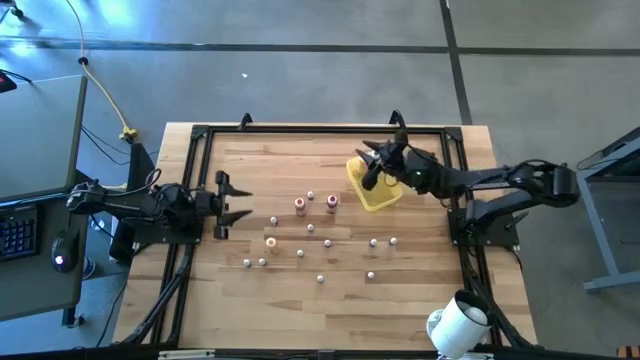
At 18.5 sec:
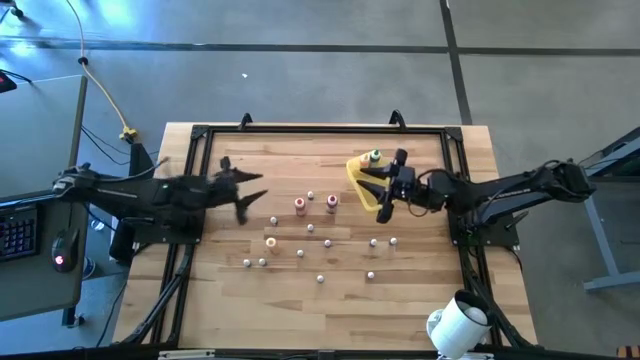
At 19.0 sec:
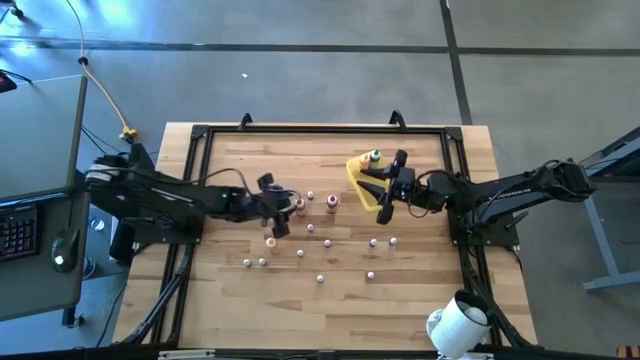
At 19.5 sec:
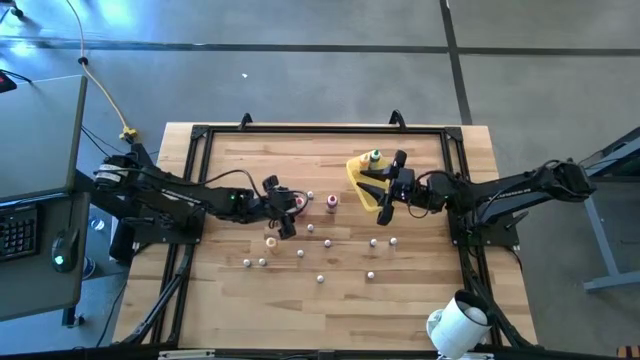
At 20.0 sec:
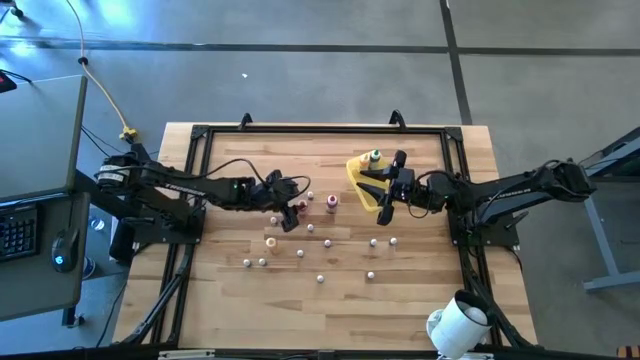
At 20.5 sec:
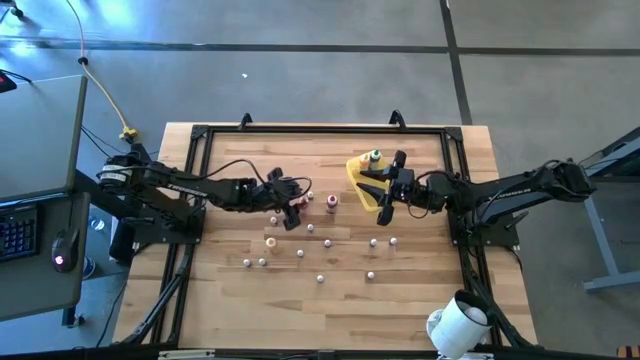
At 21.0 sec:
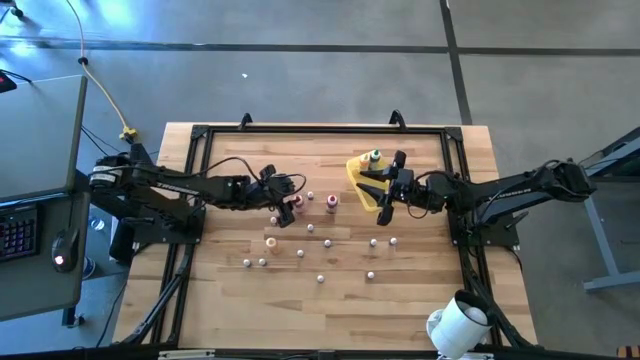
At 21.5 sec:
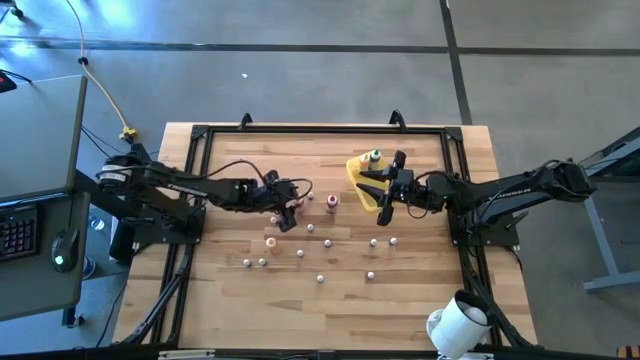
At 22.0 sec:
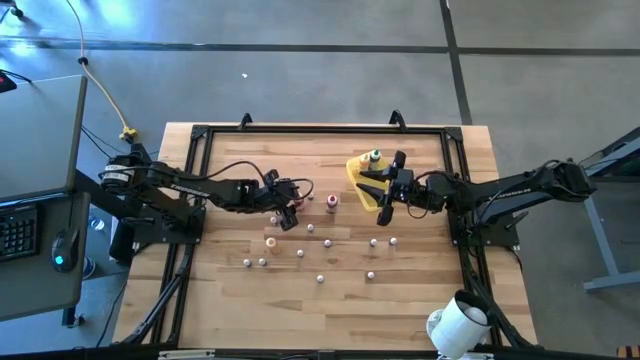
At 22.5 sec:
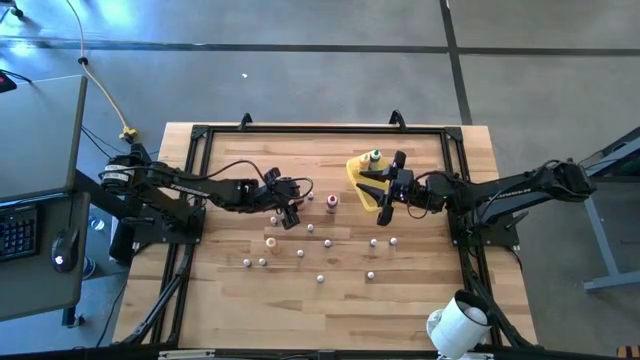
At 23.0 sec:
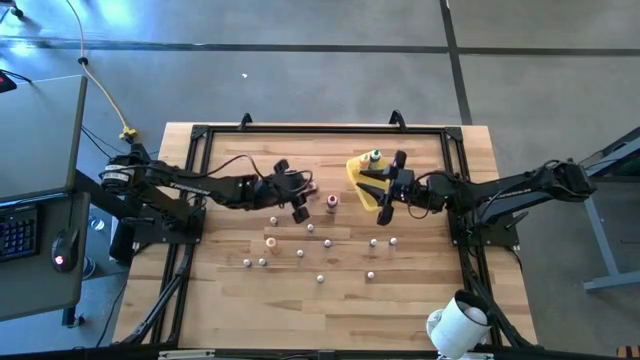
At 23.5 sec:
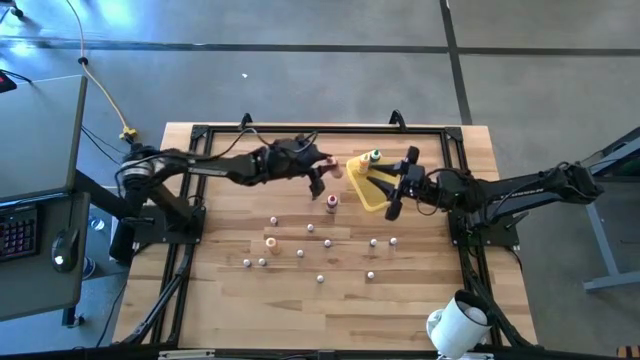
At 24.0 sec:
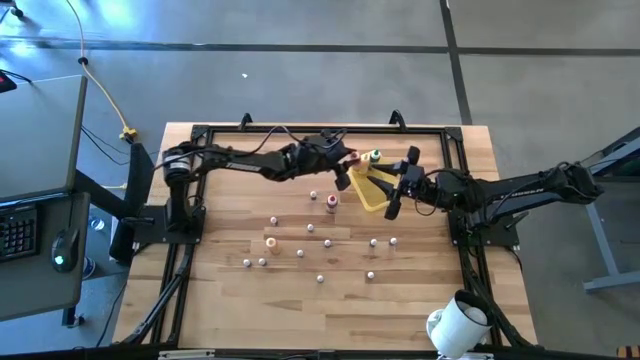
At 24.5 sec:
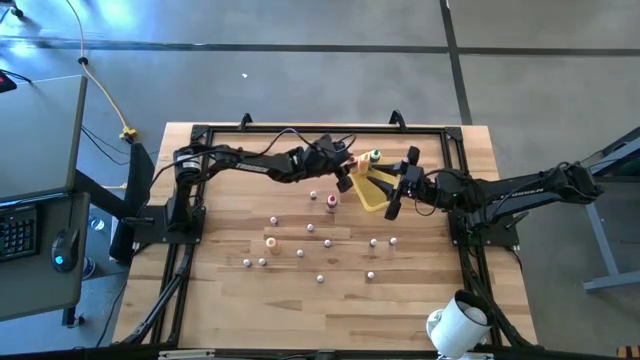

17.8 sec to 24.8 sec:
Task: Pick & Place food coloring
Put the large orange food coloring bottle into the bin

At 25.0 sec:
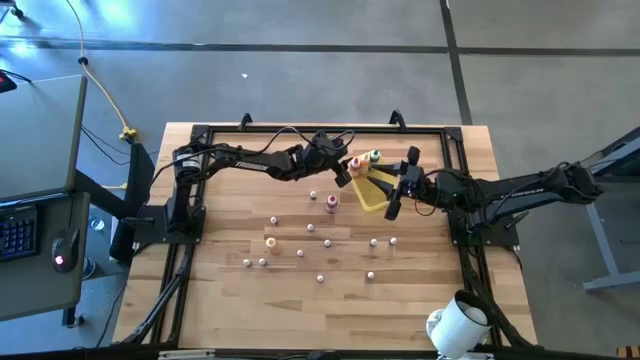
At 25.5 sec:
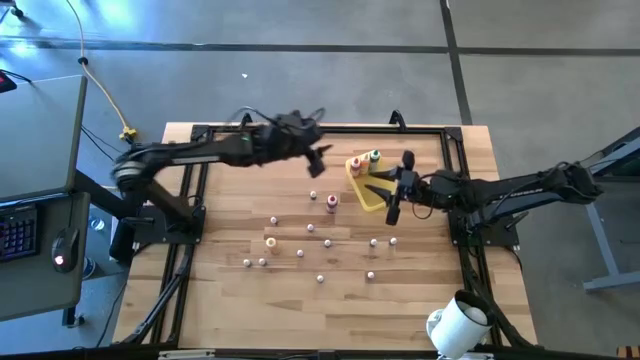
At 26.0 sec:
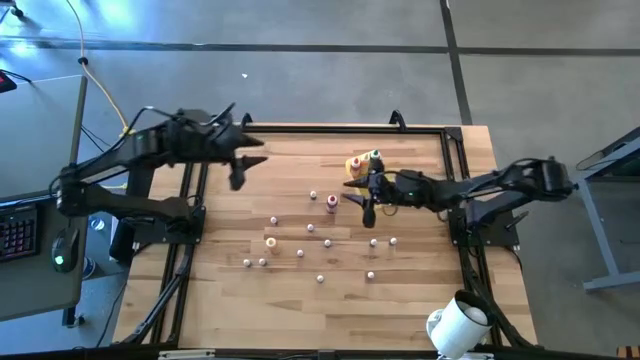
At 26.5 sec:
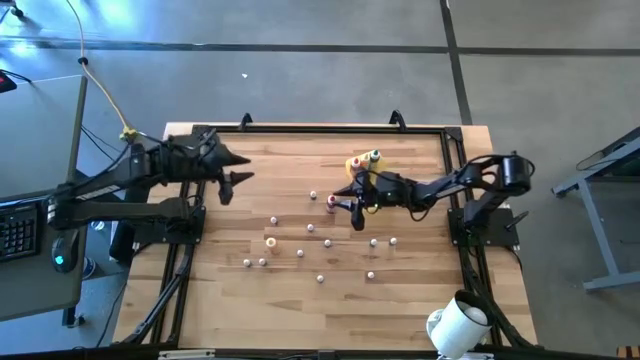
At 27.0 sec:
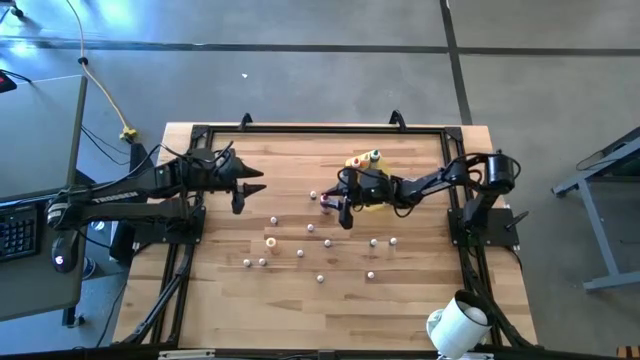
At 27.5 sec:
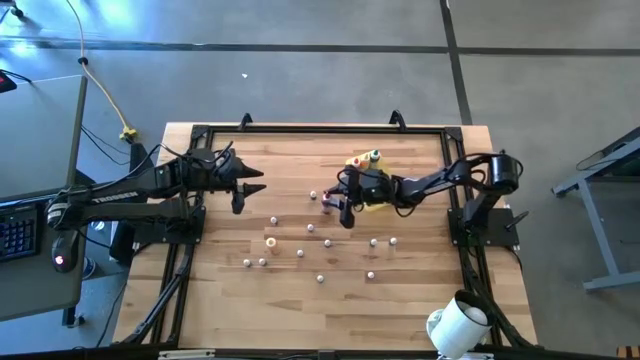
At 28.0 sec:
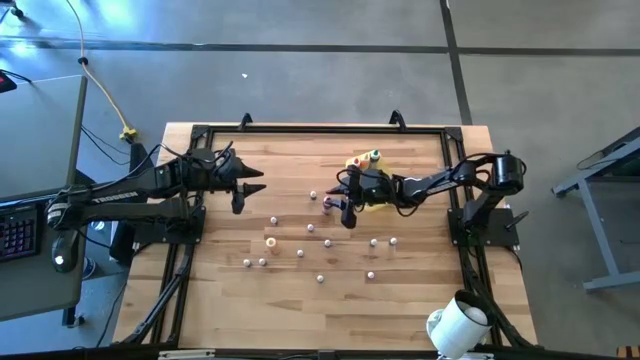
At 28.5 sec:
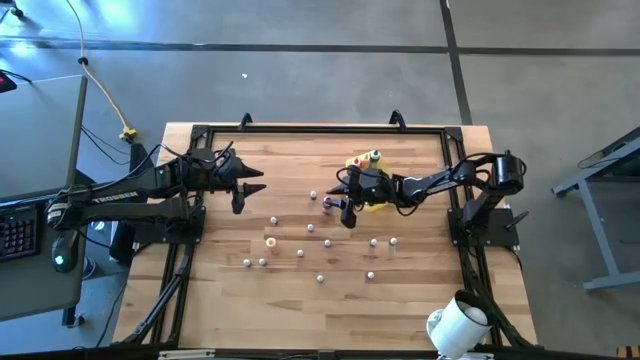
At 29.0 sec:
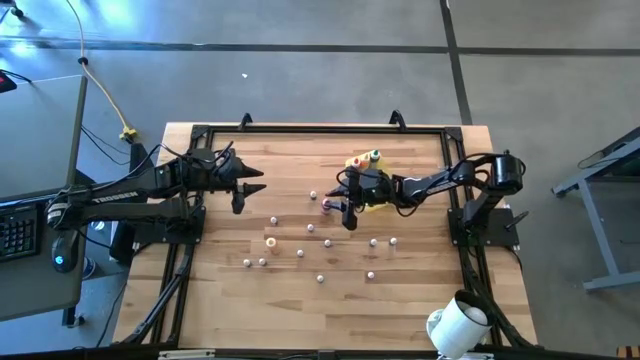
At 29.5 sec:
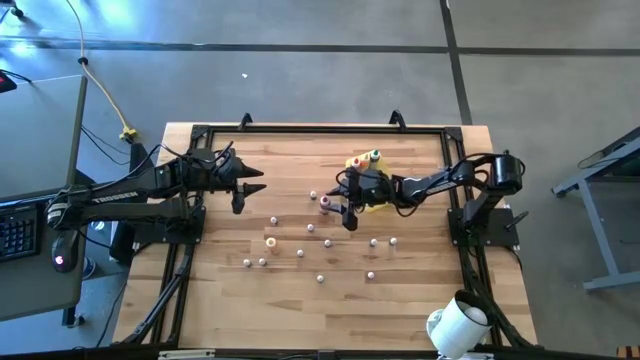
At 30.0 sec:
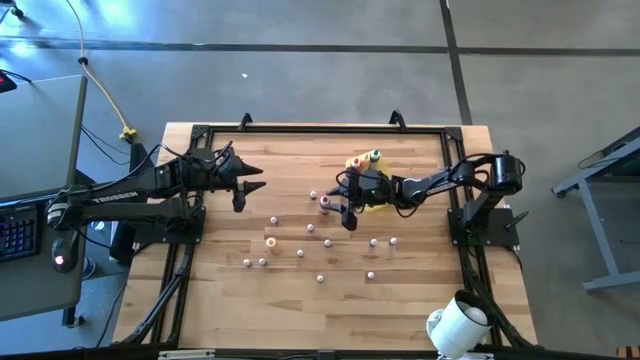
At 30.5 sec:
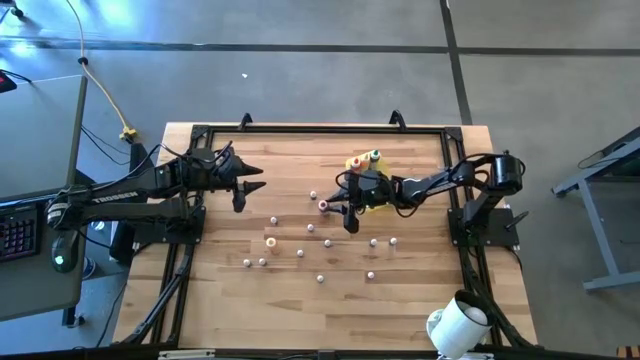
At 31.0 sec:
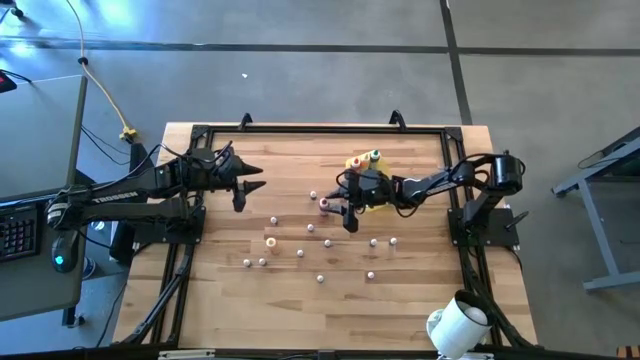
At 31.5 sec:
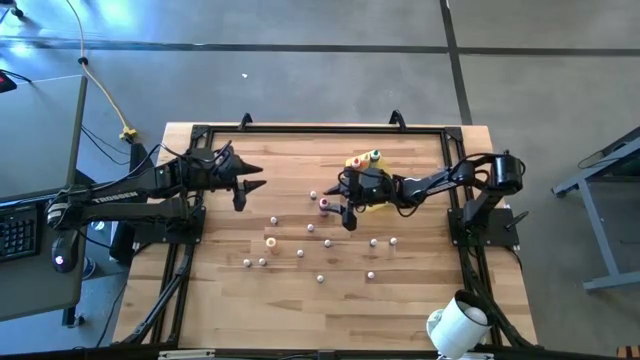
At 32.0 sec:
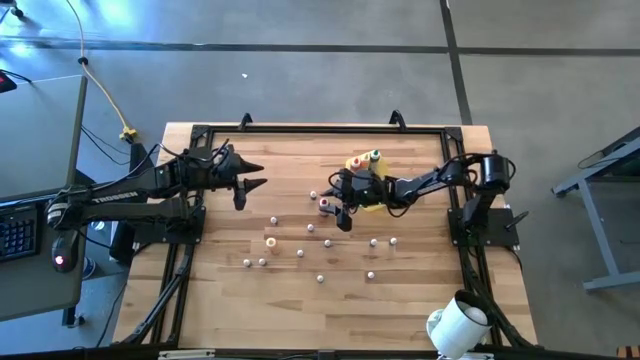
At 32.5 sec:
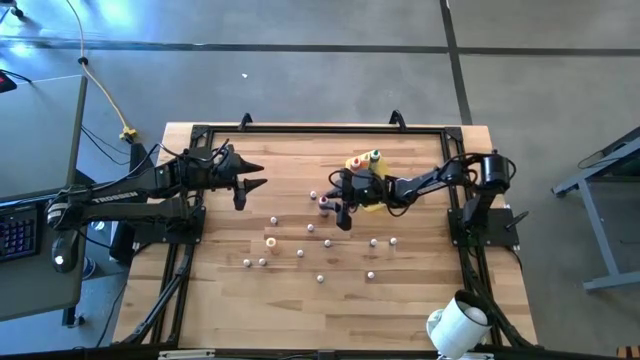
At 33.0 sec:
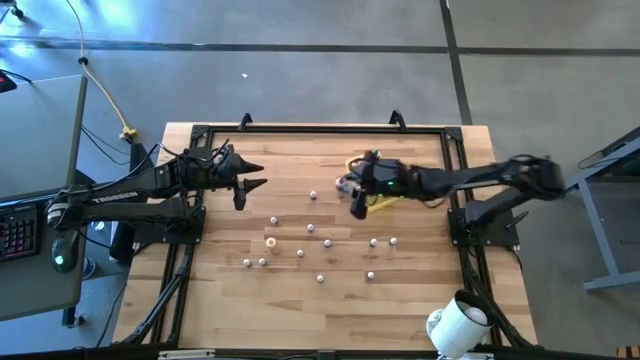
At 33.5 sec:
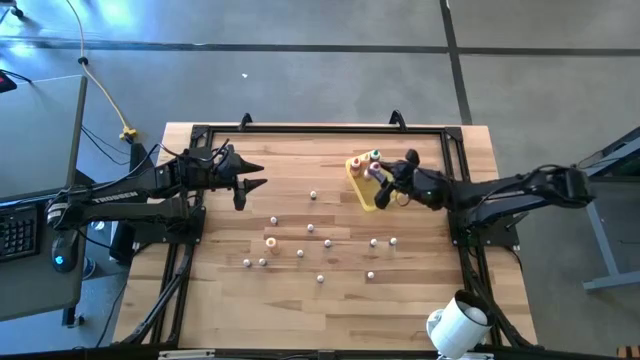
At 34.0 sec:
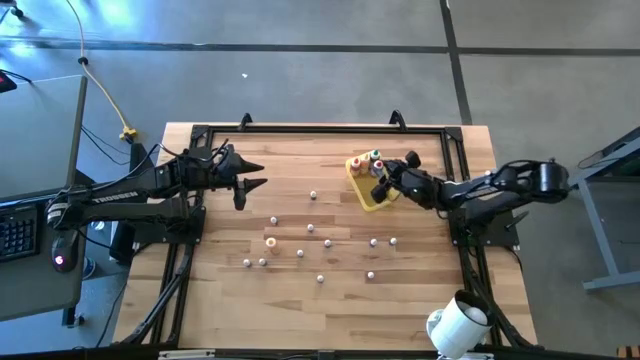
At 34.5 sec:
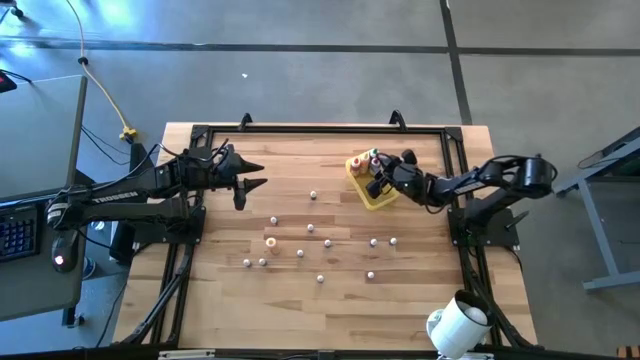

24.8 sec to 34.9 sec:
Put the large red food coloring bottle into the bin

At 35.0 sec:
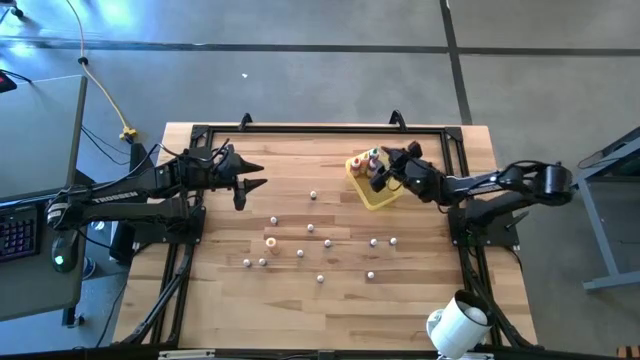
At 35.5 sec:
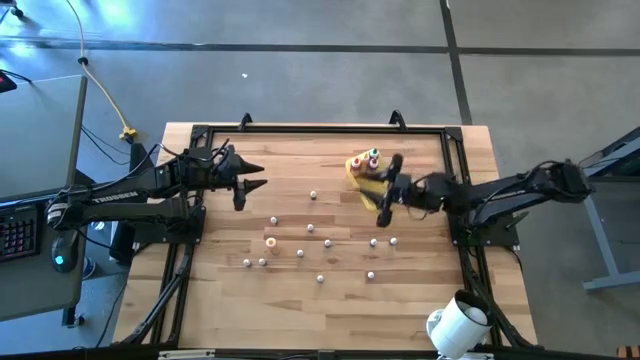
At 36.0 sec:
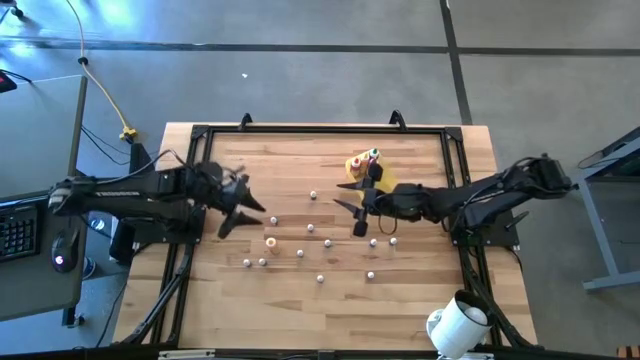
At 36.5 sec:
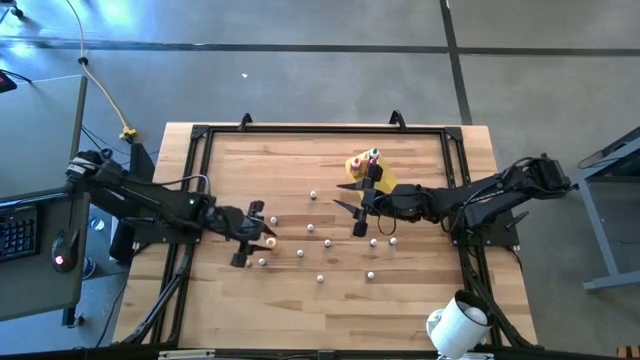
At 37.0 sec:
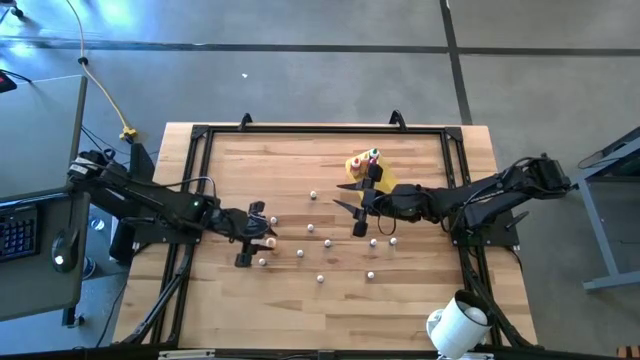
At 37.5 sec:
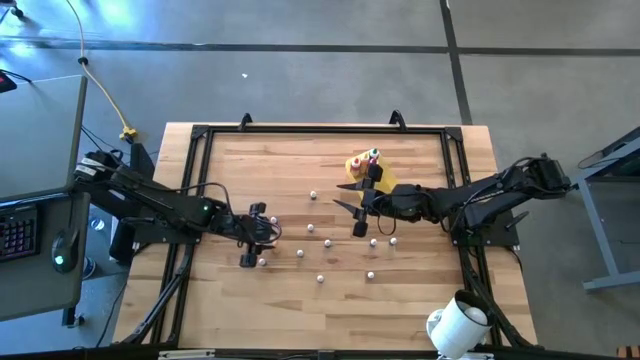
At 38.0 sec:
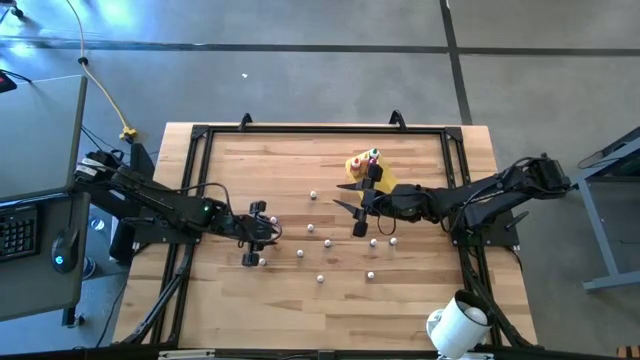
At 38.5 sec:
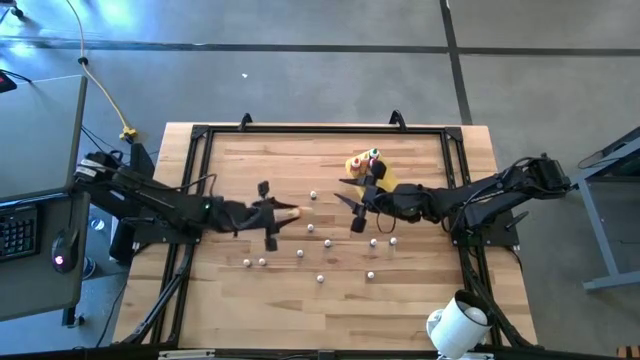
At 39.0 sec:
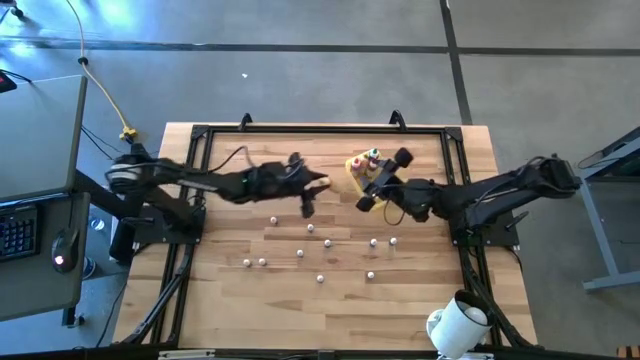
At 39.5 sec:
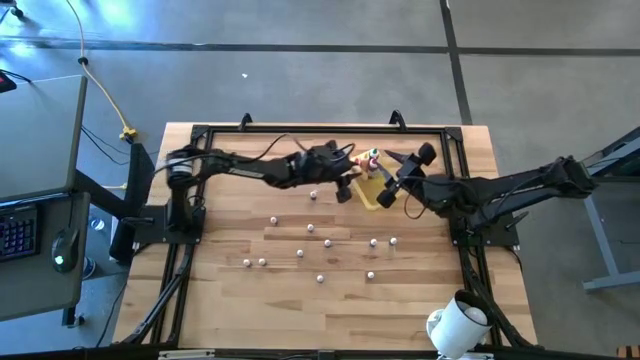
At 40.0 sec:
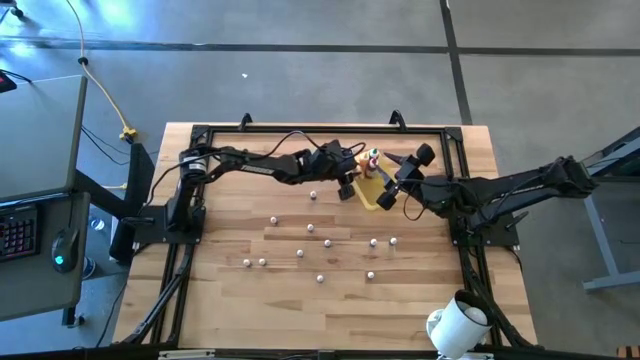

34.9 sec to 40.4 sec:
Put the large yellow food coloring bottle into the bin
